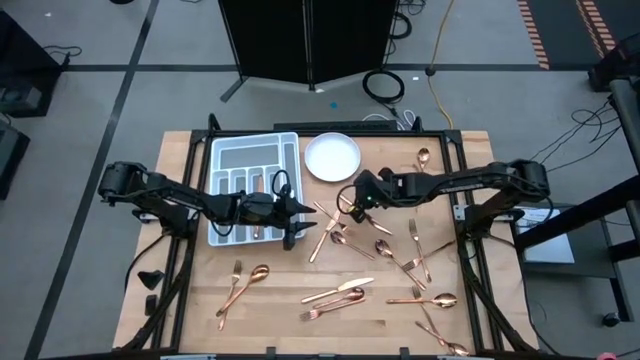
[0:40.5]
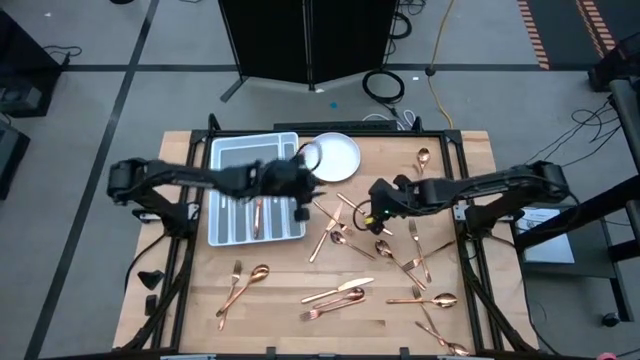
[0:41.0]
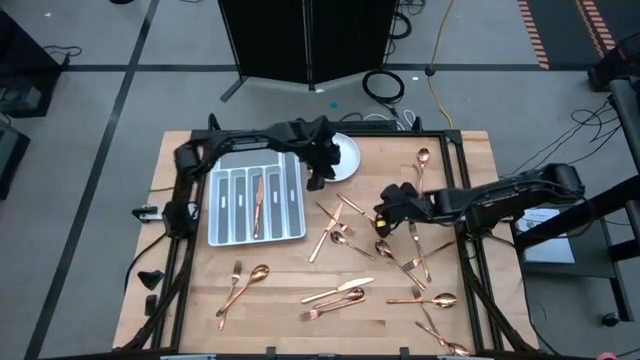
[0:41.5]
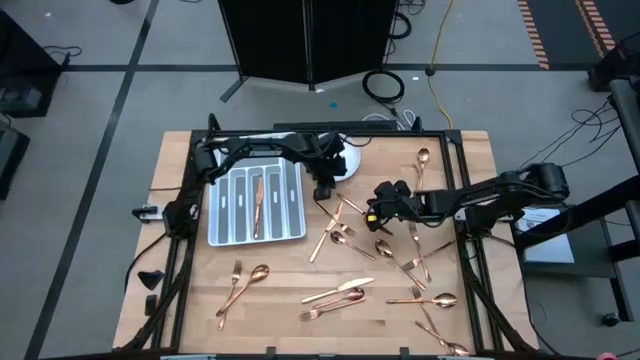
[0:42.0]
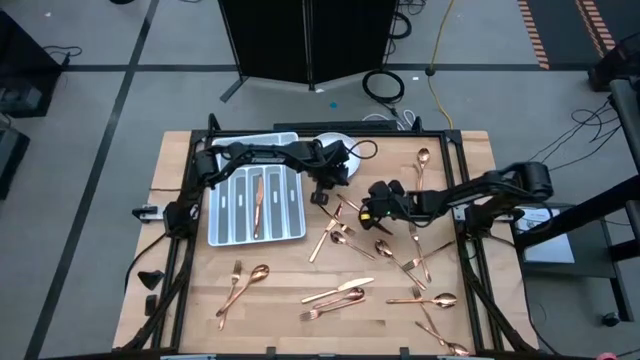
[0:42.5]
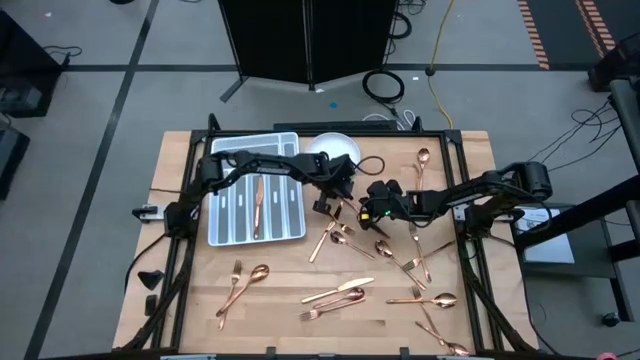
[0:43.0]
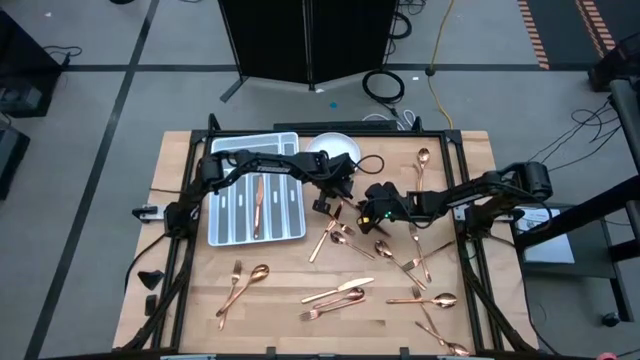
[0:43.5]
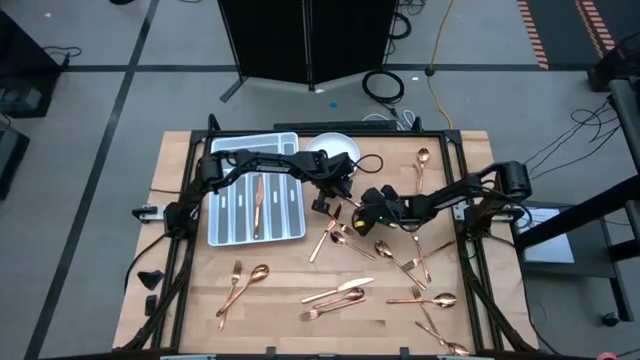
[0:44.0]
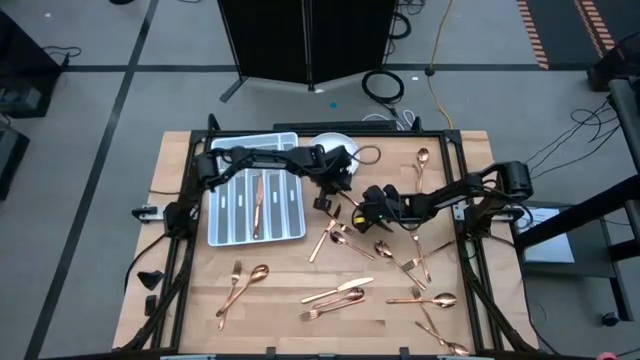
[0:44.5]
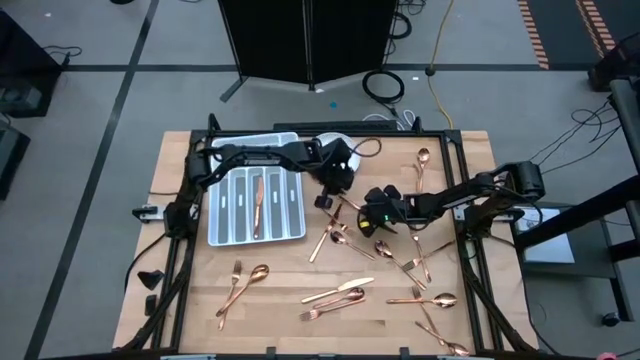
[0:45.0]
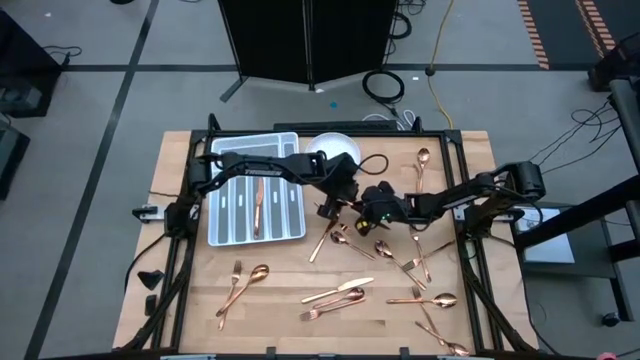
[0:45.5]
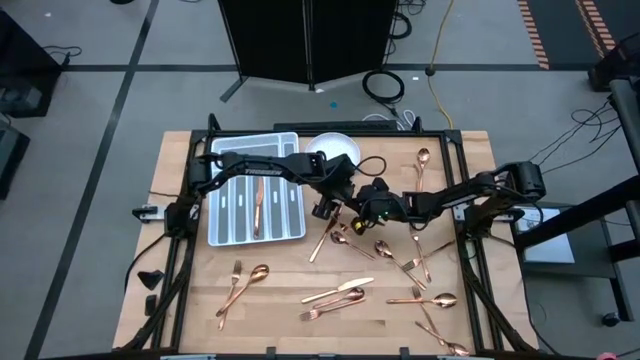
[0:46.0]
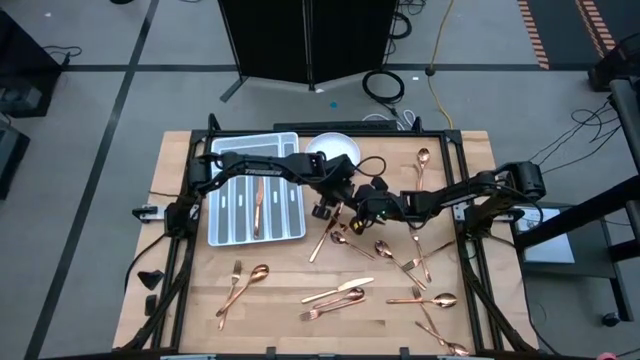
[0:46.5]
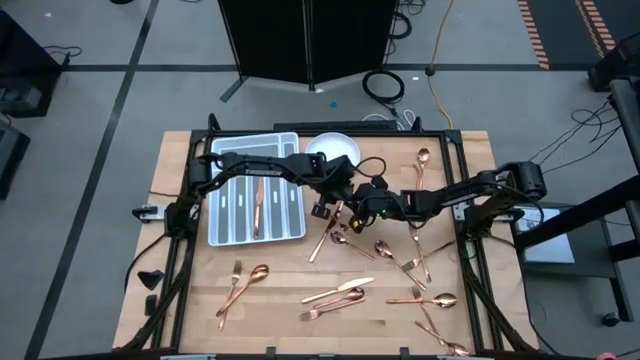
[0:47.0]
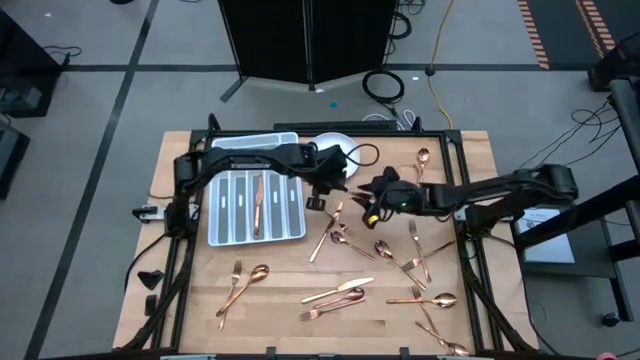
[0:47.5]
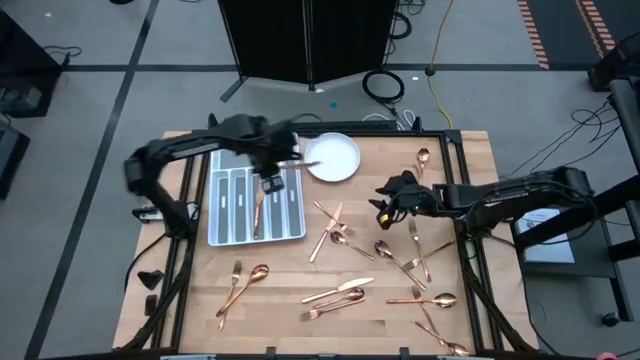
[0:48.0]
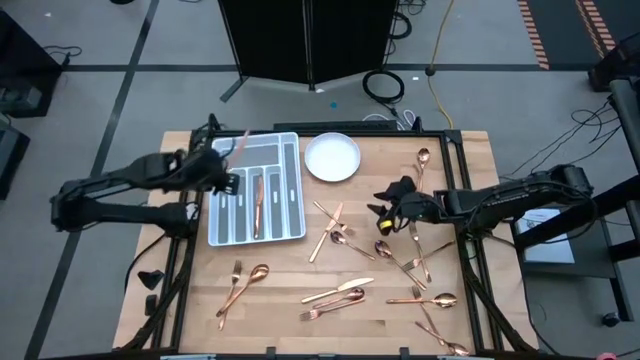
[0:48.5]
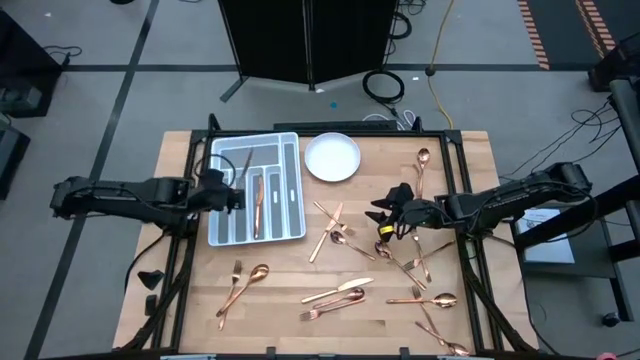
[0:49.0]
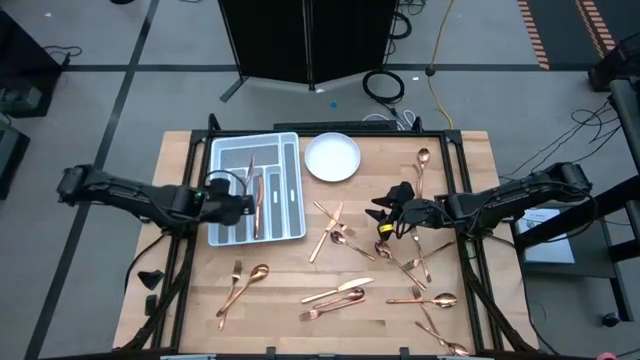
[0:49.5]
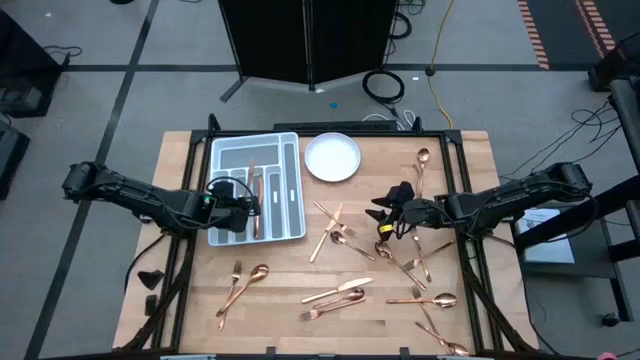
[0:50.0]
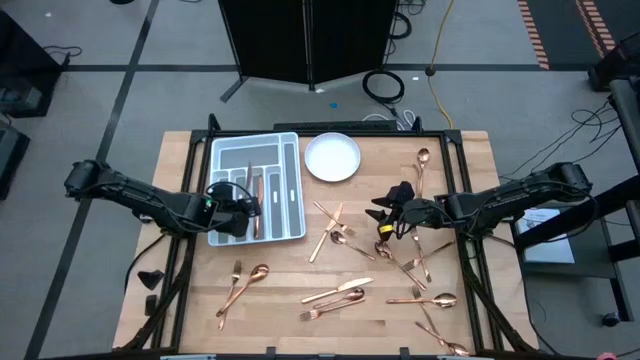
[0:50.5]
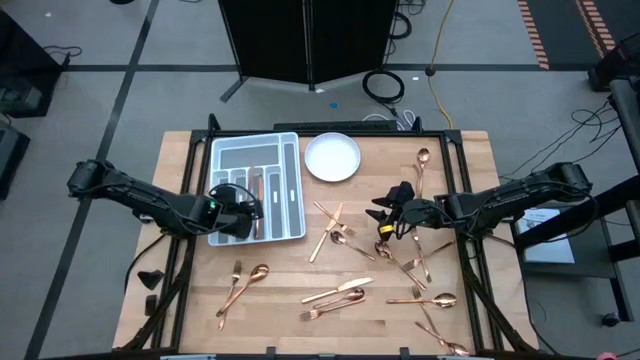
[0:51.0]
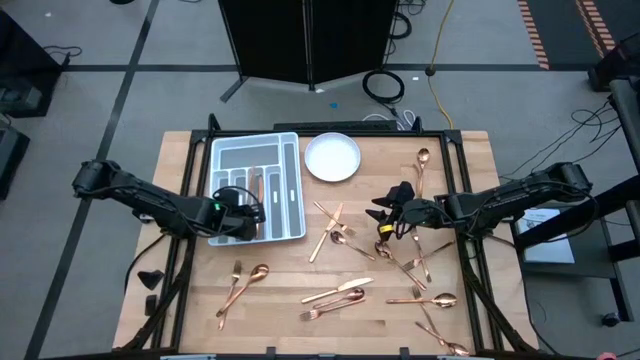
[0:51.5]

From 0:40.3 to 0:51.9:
Task: Sort silverware
Put the knife on the utensil tray
